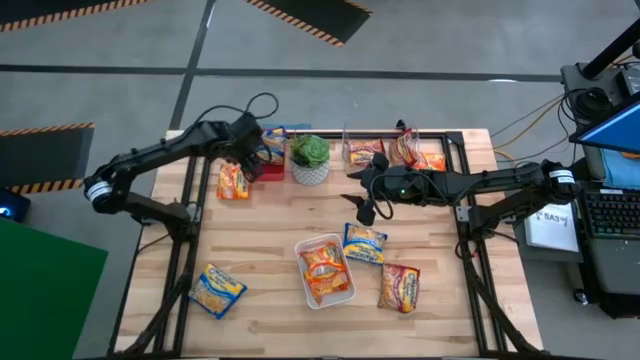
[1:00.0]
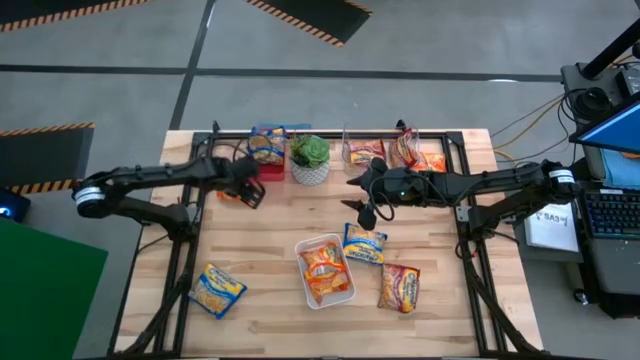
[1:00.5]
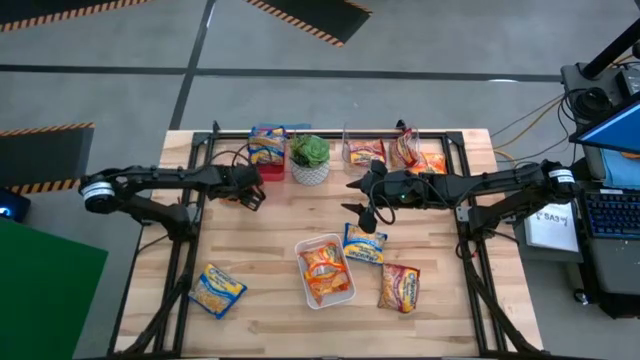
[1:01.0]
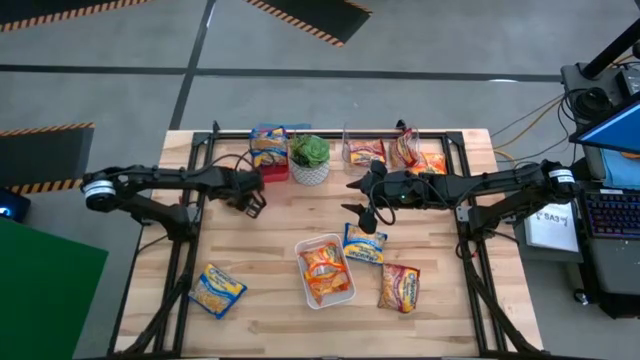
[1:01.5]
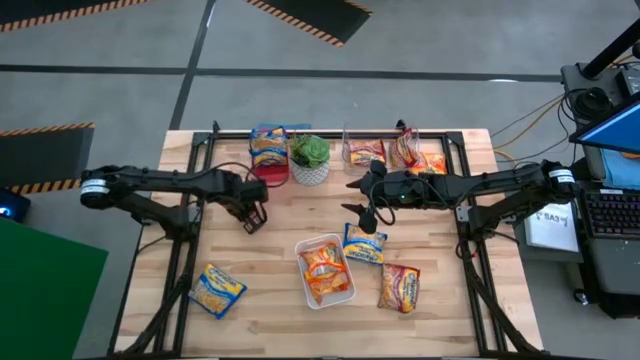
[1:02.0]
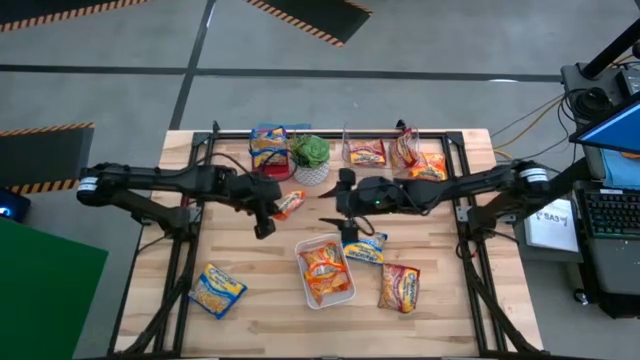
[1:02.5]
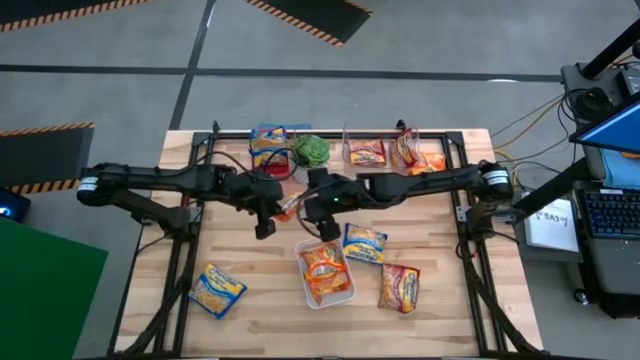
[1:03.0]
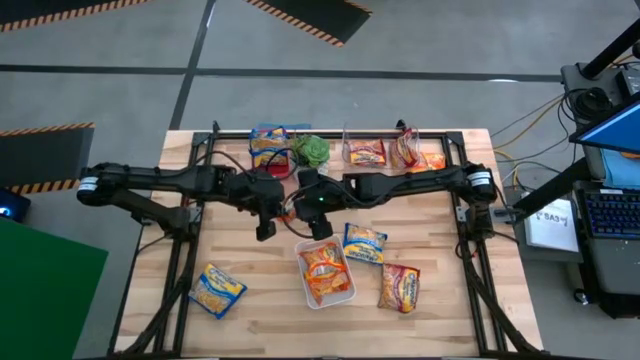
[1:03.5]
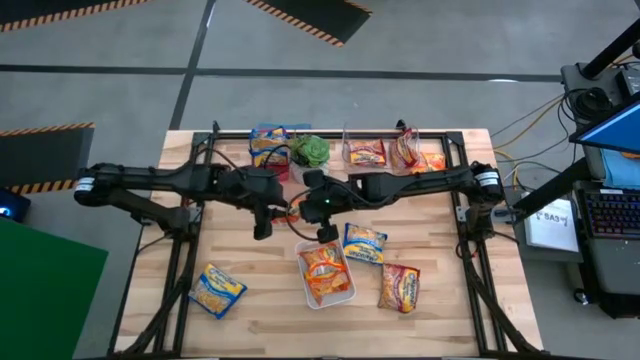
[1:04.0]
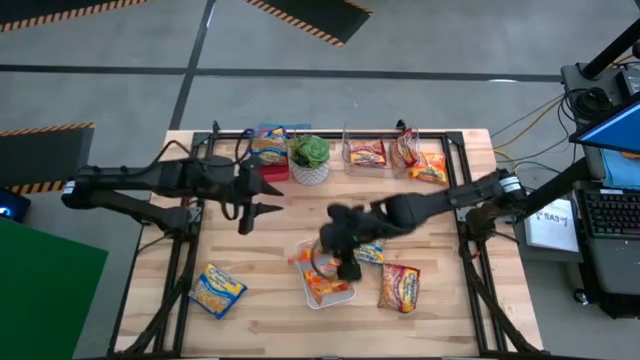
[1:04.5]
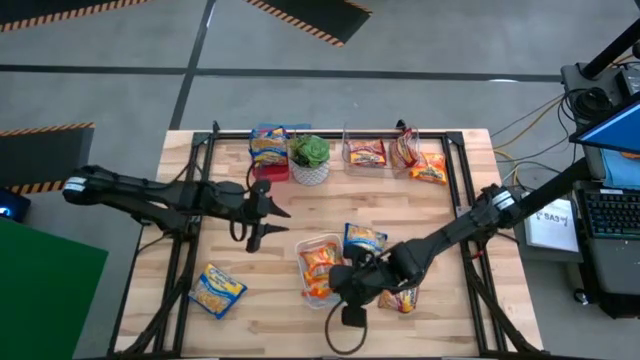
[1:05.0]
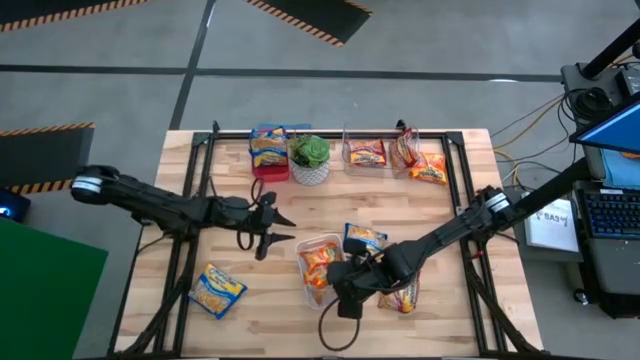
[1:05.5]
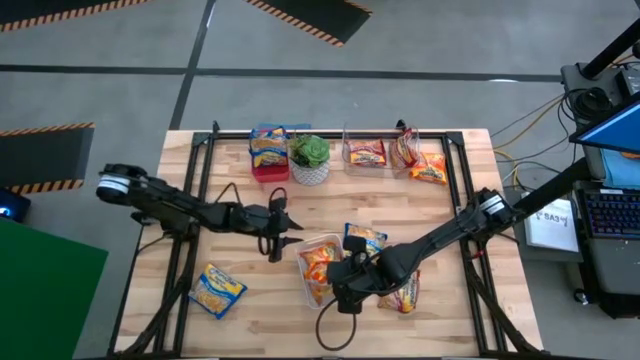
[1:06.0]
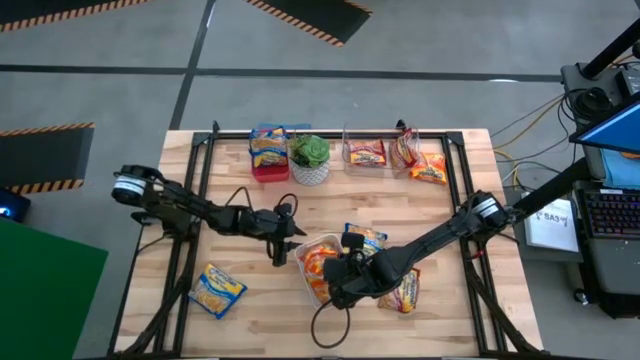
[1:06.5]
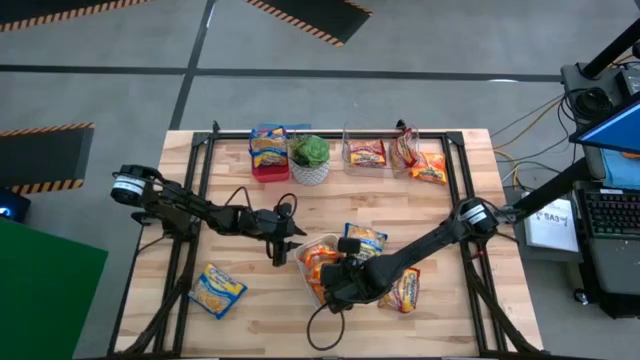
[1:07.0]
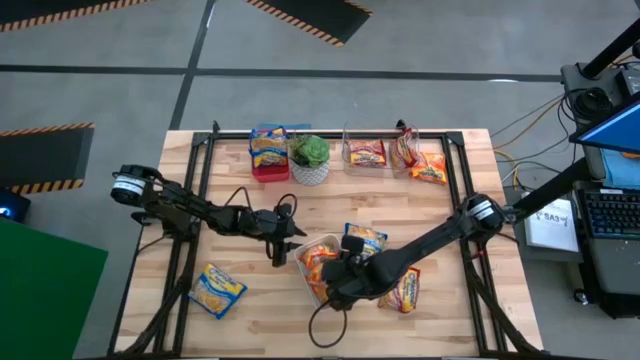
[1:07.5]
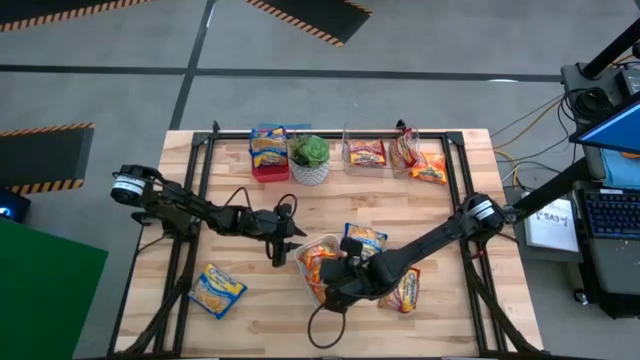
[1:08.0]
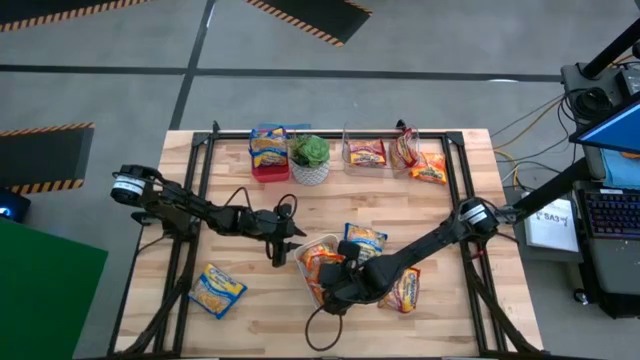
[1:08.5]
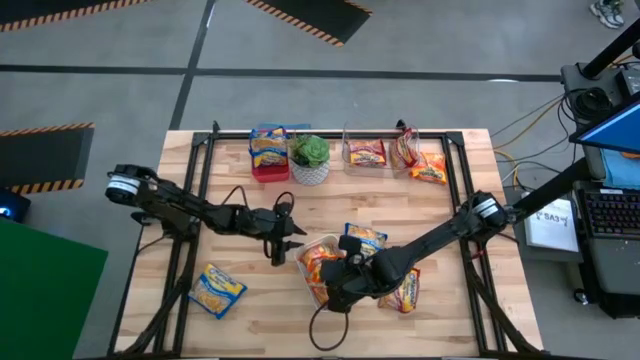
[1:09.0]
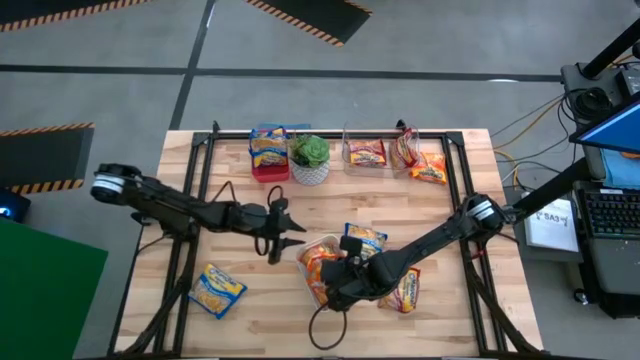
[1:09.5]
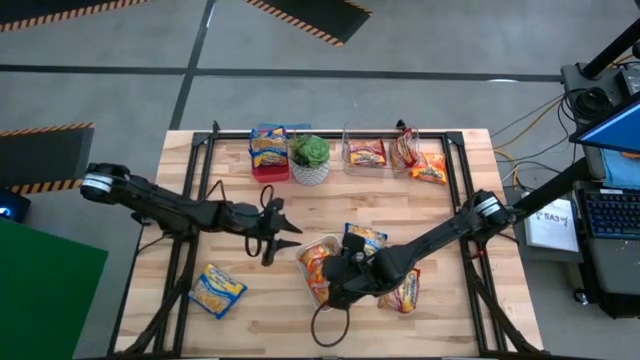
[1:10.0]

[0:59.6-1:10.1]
Task: Sort Maruchan noodles
Put the orange noodle pack into the white bin

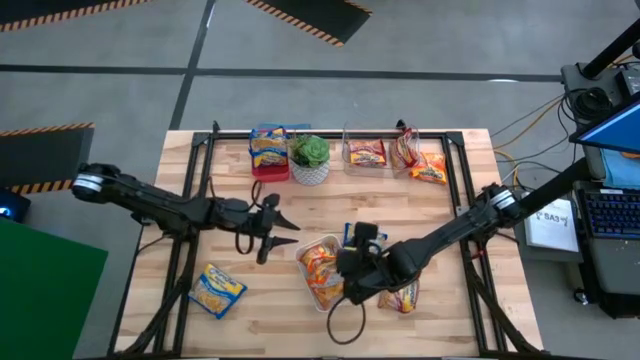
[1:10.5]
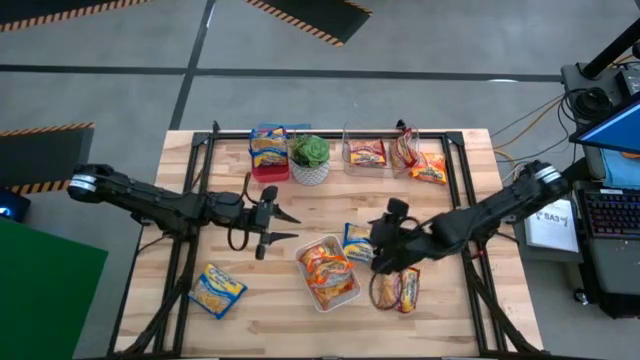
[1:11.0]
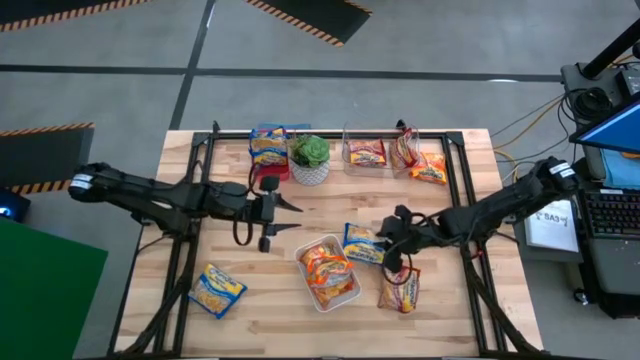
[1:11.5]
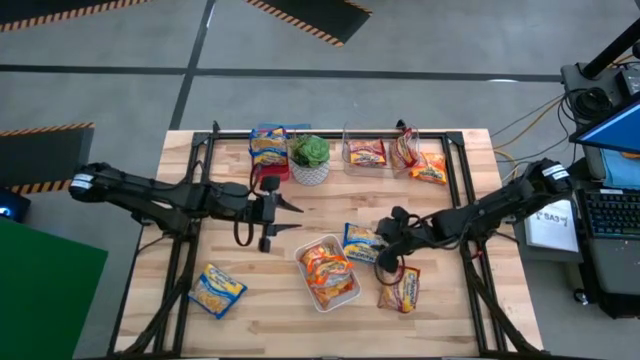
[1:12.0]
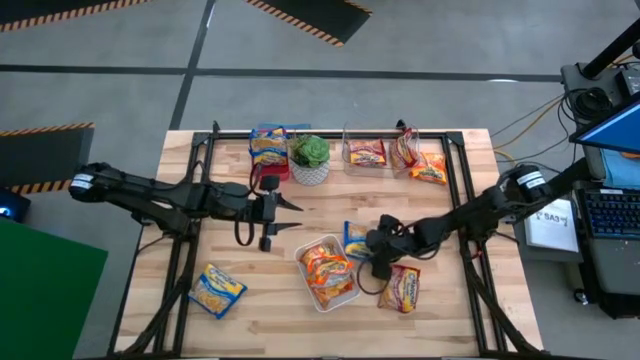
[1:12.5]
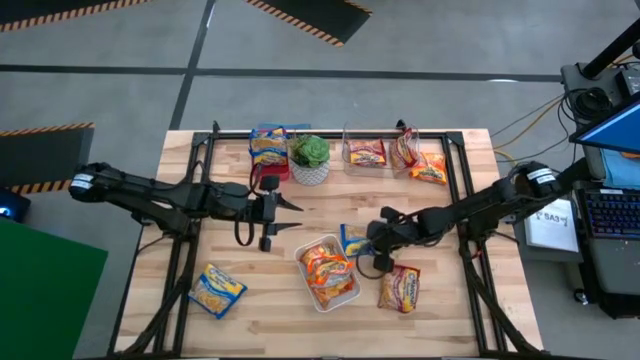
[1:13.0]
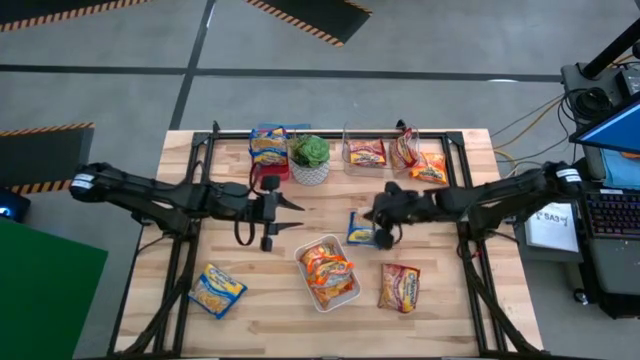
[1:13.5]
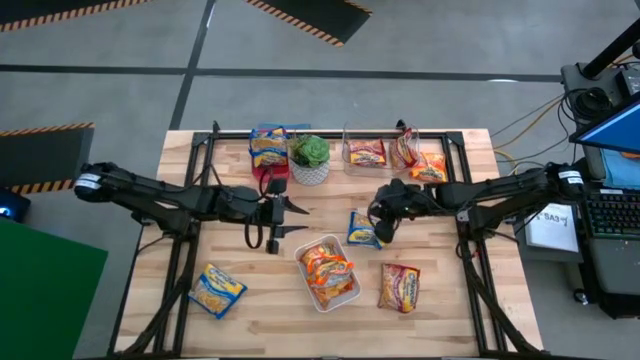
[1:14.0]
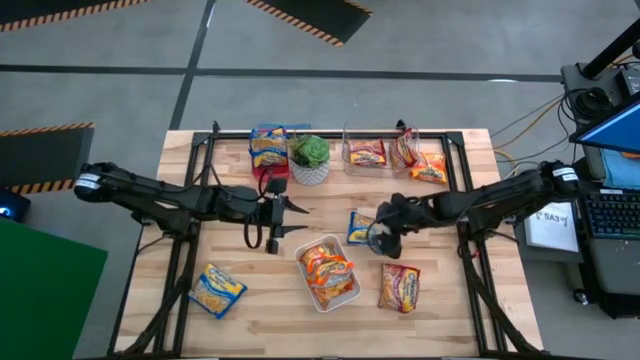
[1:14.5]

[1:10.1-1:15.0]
Put the blue noodle pack into the red bin

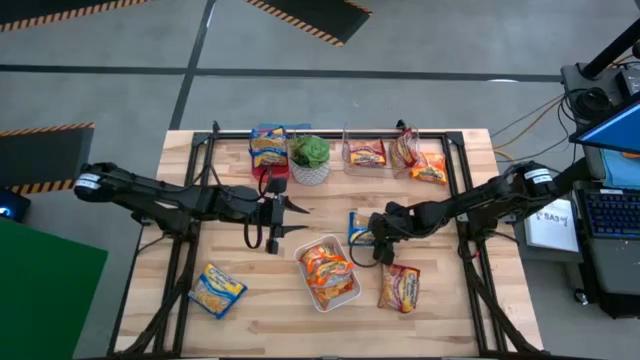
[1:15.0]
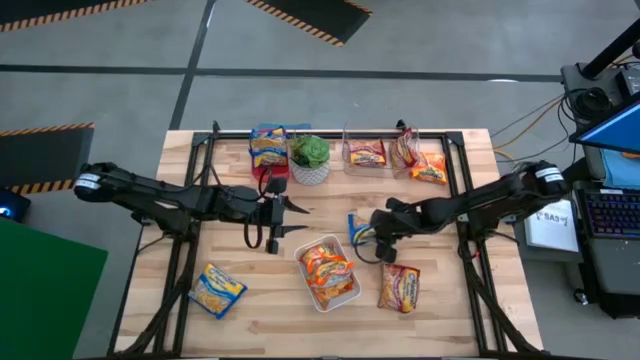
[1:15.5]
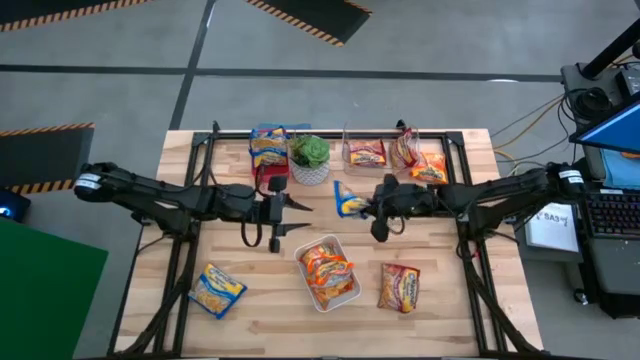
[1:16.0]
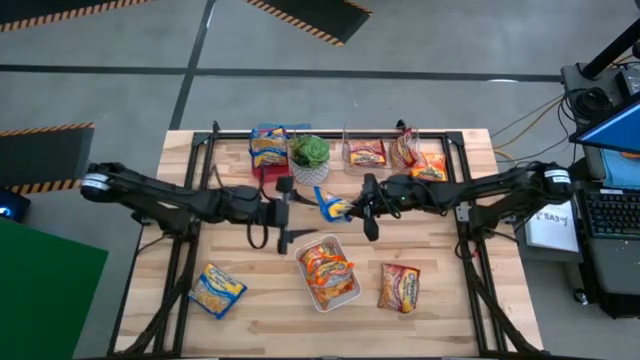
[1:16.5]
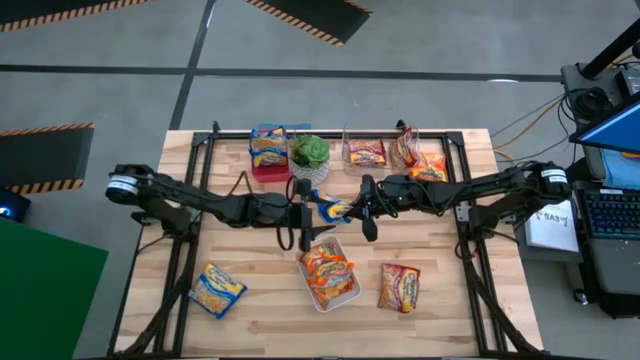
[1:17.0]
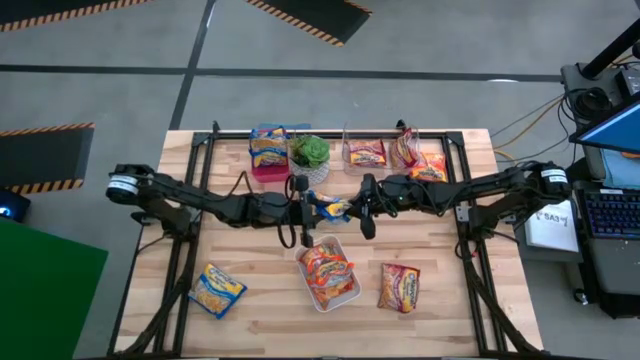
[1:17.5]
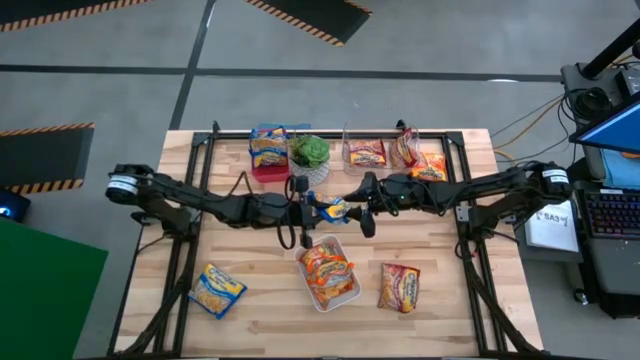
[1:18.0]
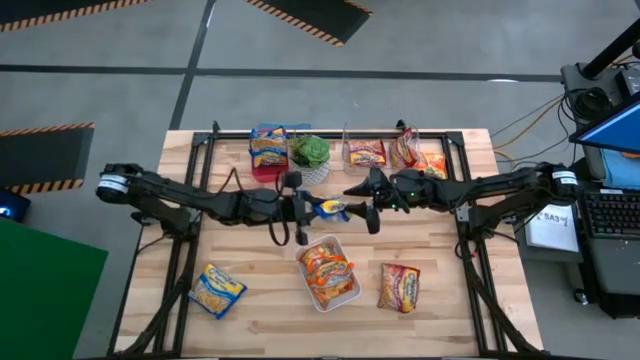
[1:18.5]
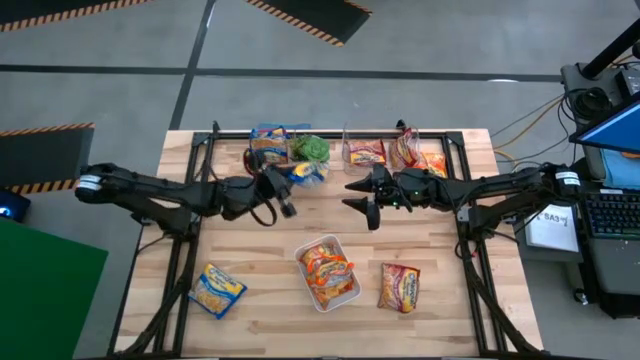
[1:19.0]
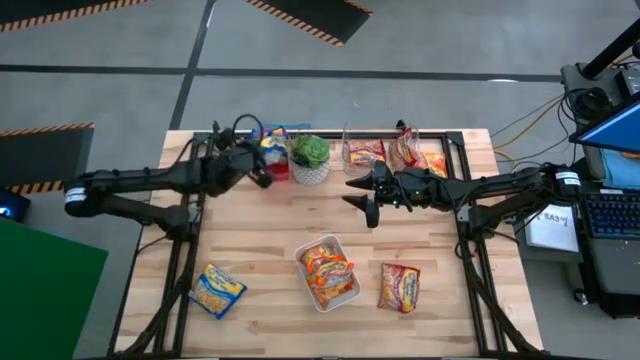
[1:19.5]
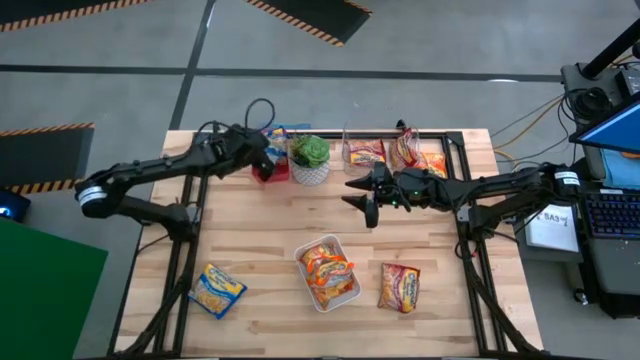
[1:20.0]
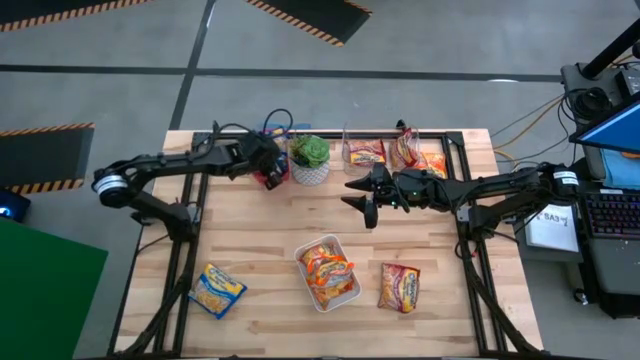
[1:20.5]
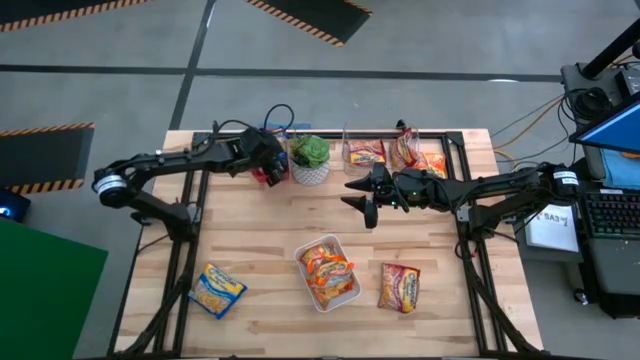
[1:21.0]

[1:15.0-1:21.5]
Put the blue noodle pack into the red bin

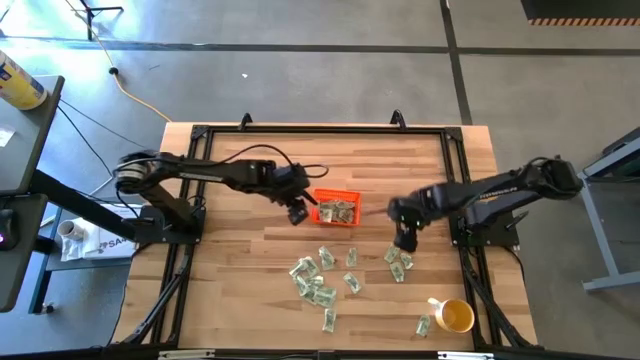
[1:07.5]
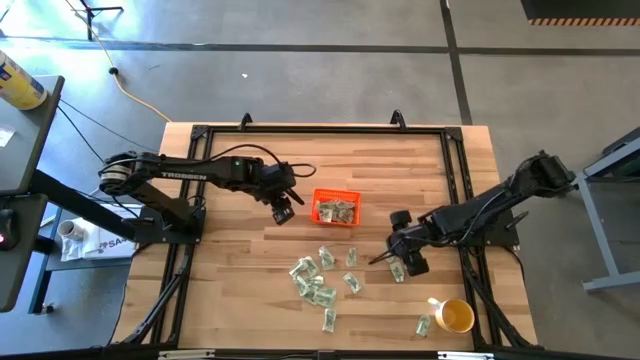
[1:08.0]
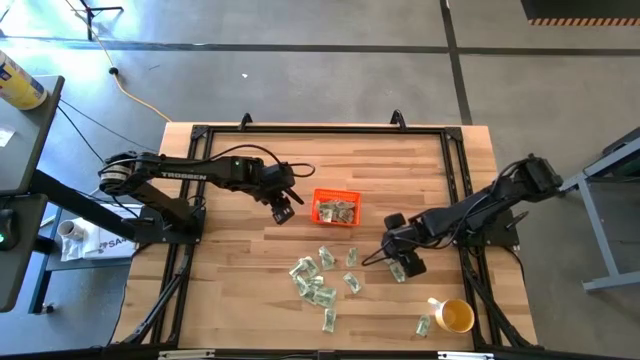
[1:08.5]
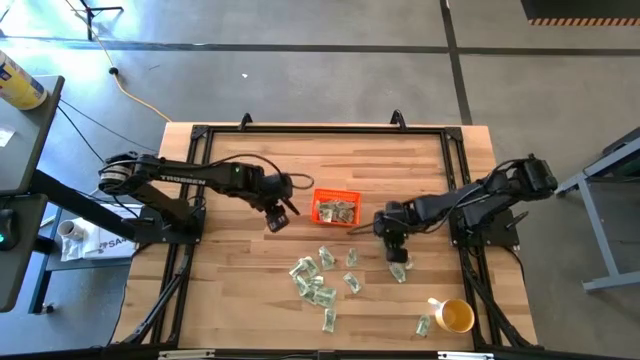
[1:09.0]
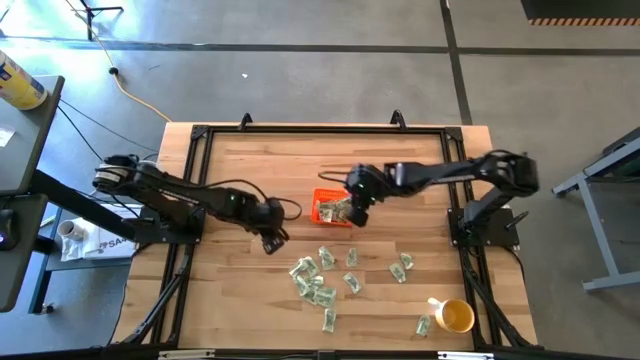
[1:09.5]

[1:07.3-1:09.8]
Task: Pick and place Stevia / Truvia into bins
Put the stevia packet into the orange bin
